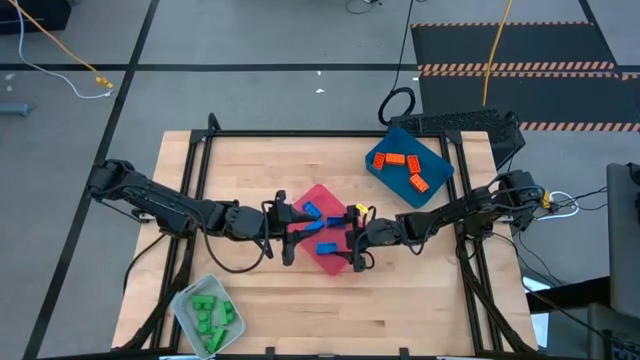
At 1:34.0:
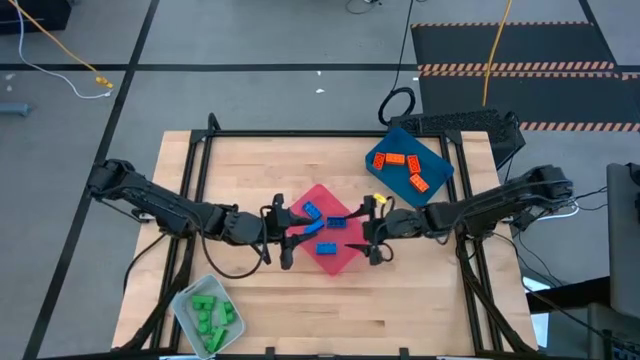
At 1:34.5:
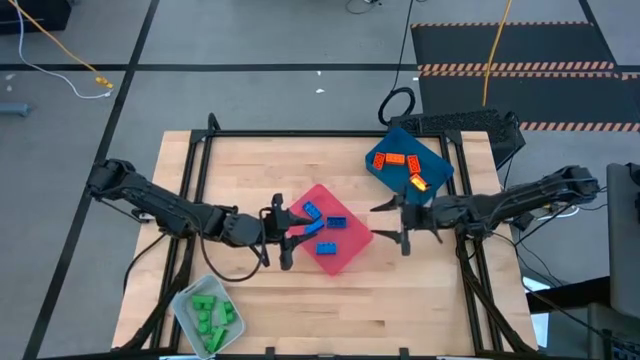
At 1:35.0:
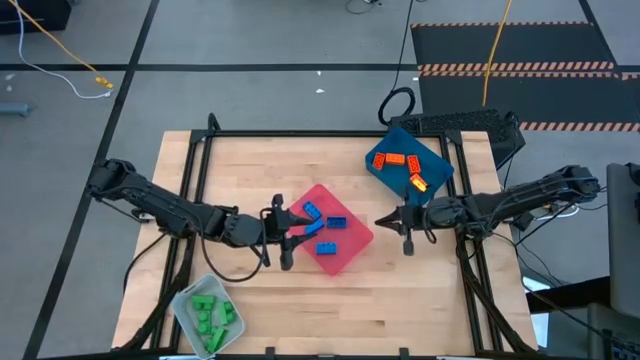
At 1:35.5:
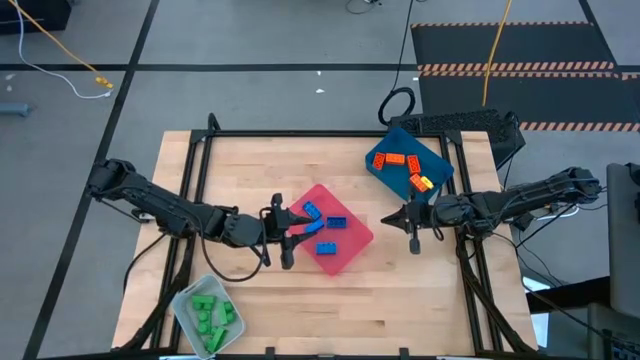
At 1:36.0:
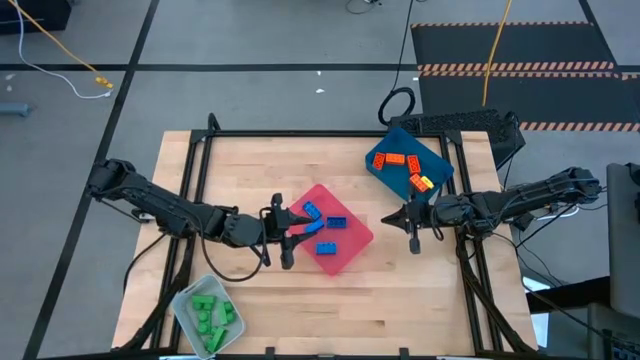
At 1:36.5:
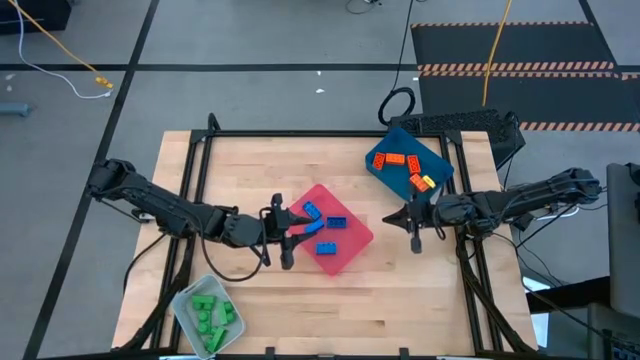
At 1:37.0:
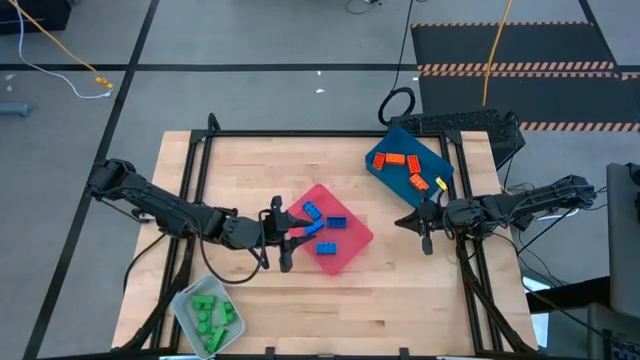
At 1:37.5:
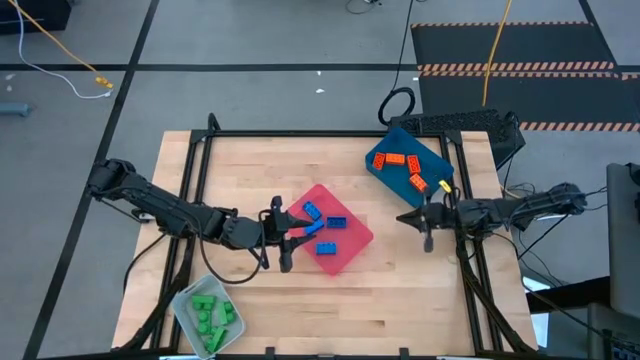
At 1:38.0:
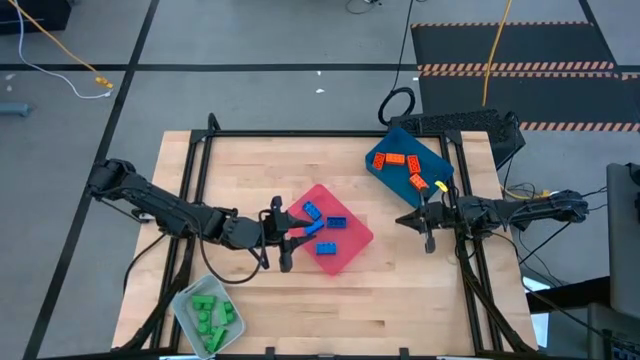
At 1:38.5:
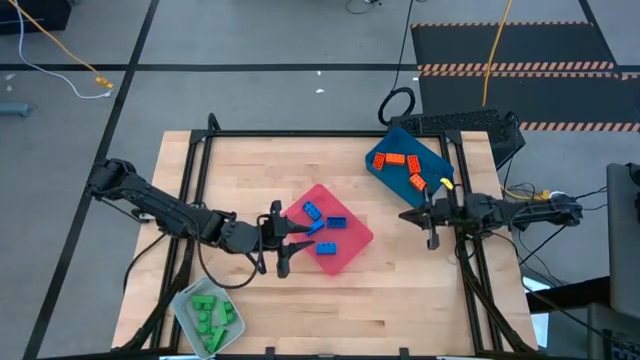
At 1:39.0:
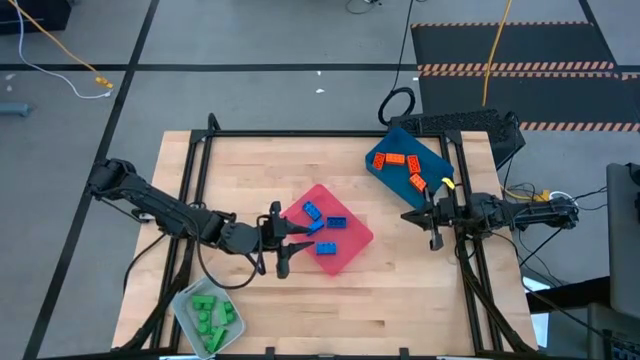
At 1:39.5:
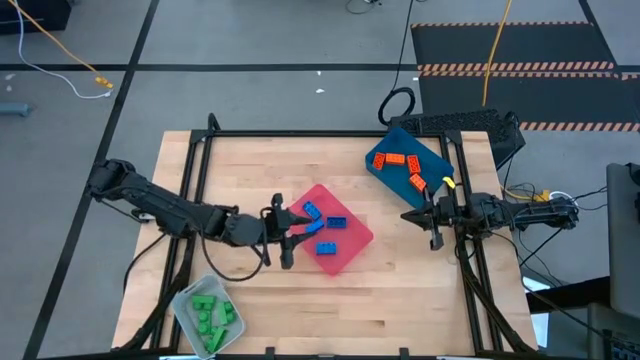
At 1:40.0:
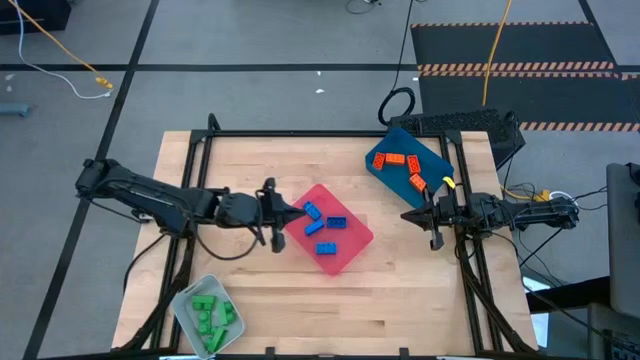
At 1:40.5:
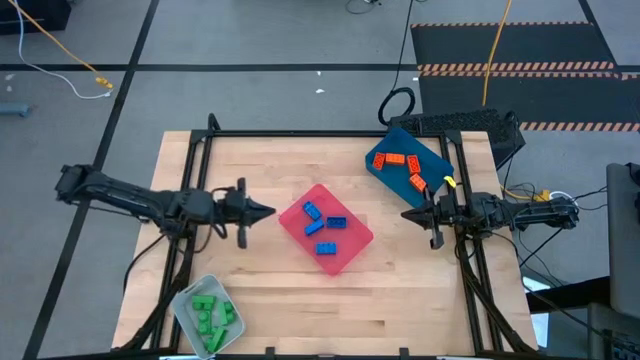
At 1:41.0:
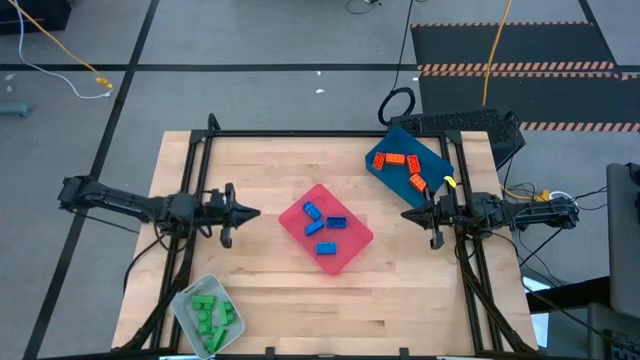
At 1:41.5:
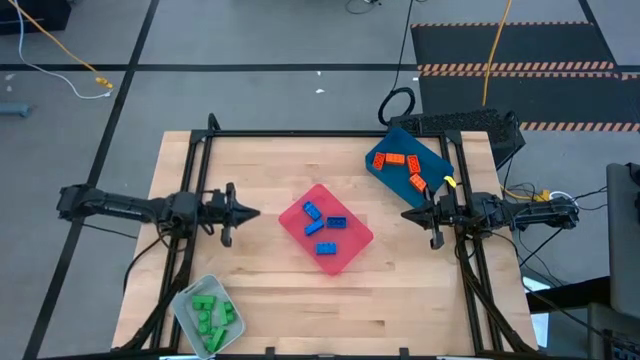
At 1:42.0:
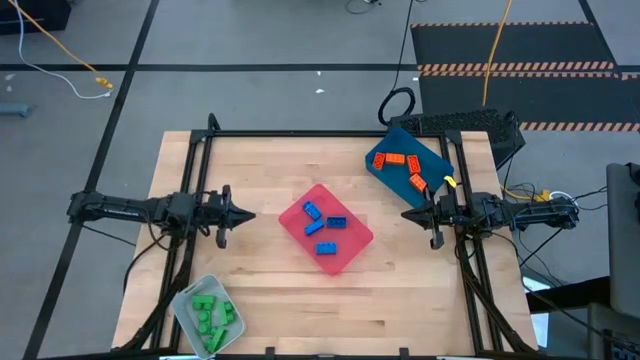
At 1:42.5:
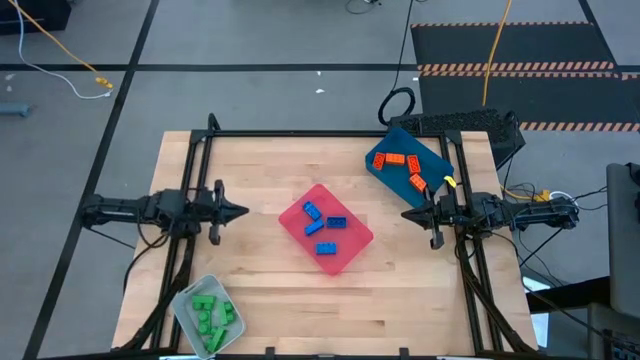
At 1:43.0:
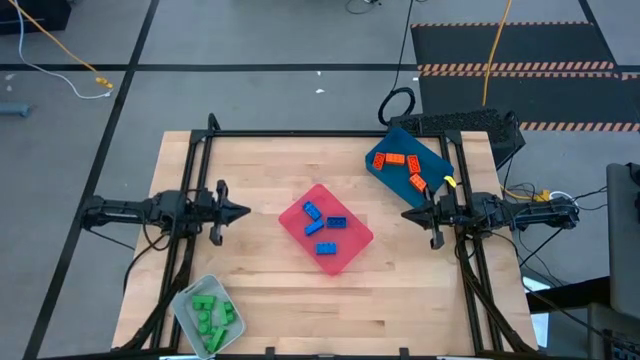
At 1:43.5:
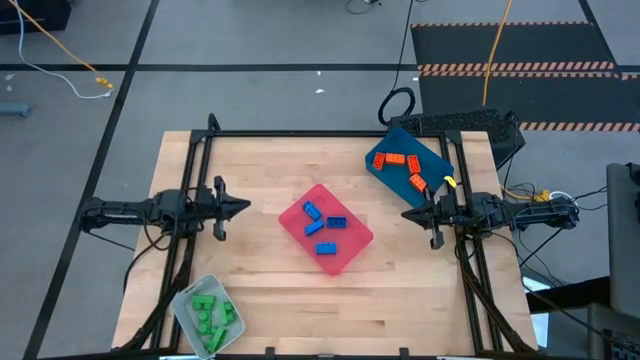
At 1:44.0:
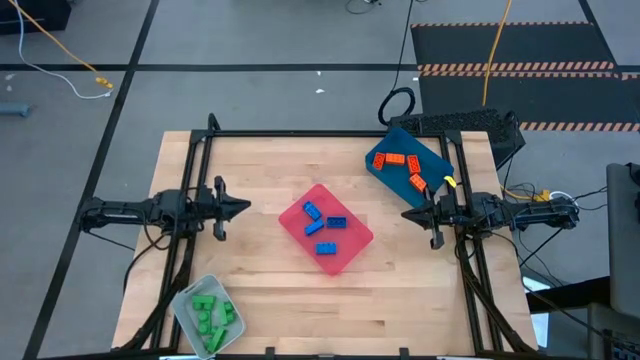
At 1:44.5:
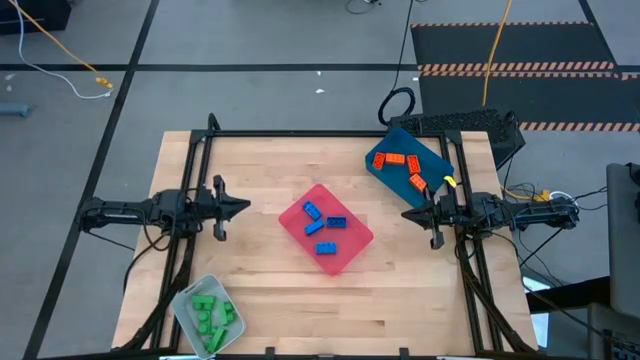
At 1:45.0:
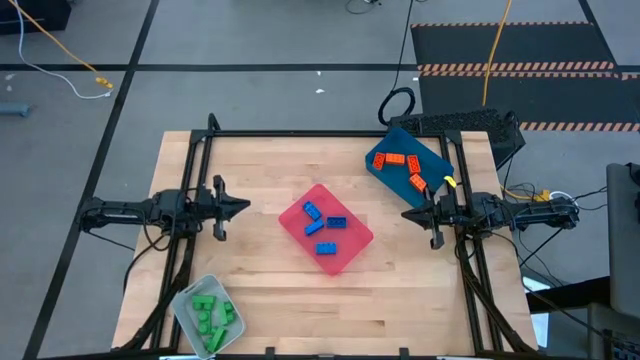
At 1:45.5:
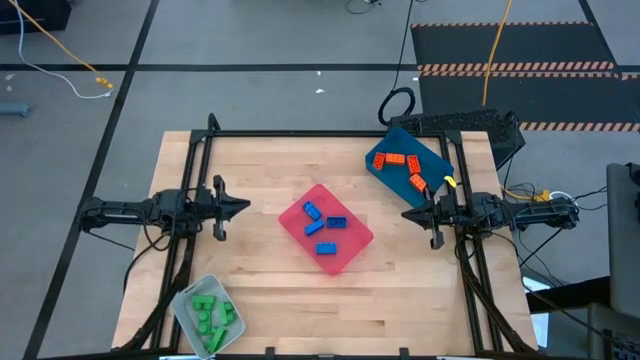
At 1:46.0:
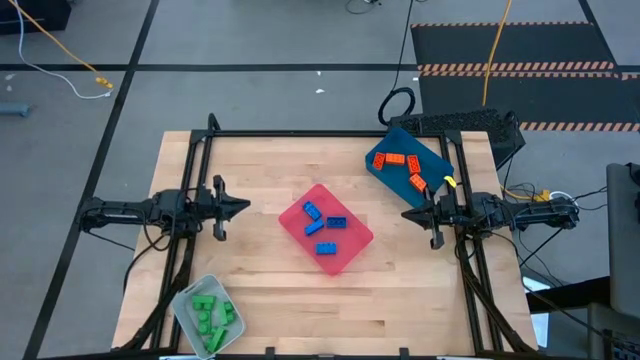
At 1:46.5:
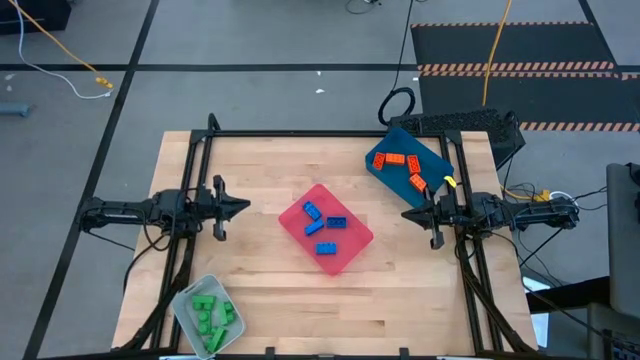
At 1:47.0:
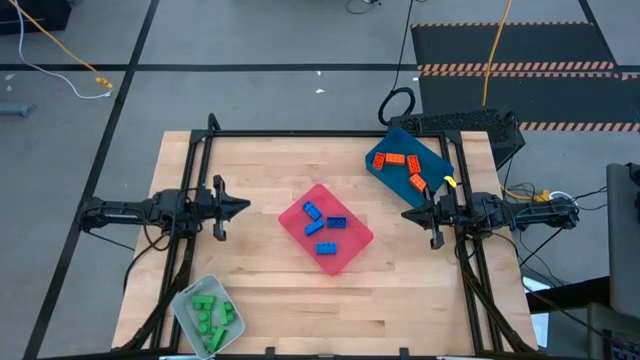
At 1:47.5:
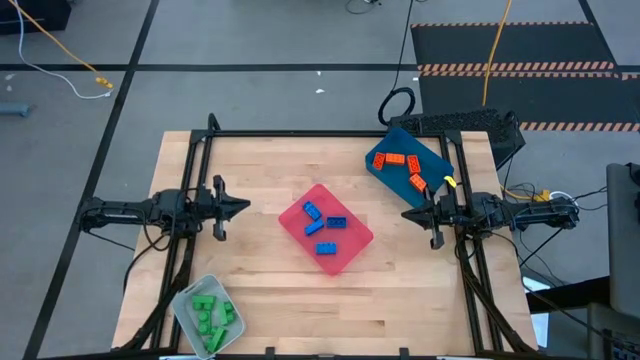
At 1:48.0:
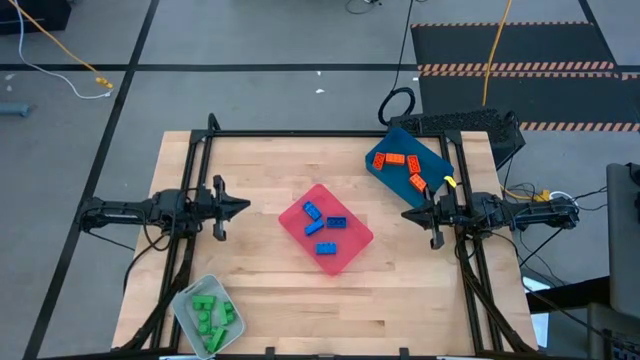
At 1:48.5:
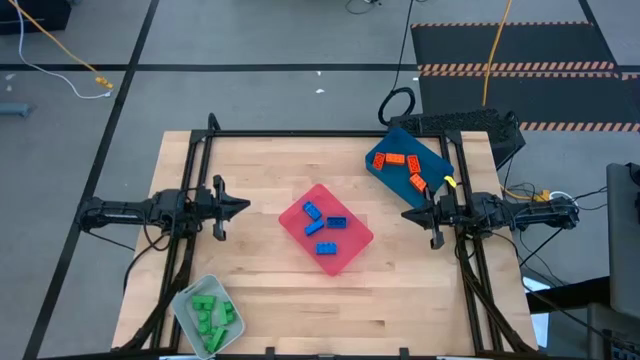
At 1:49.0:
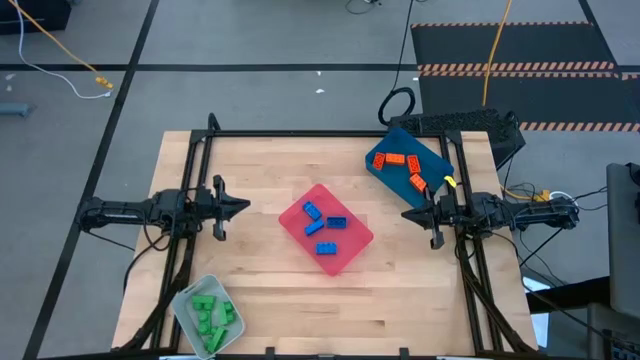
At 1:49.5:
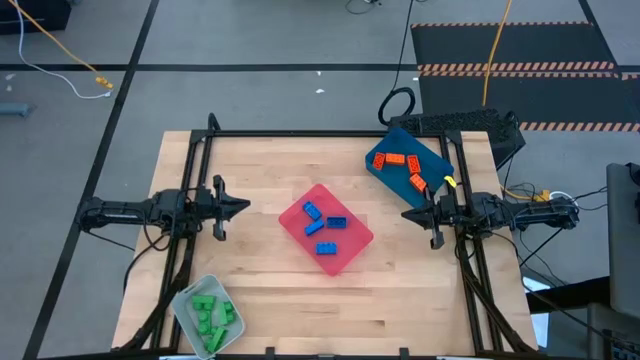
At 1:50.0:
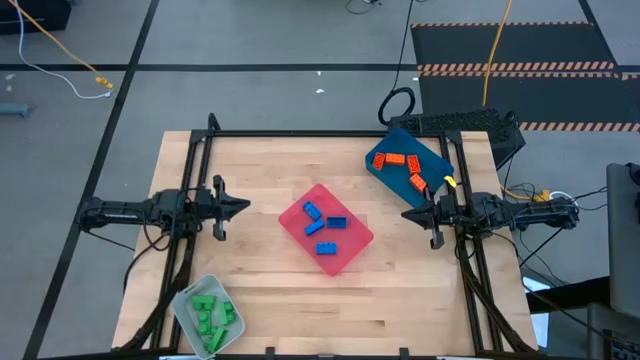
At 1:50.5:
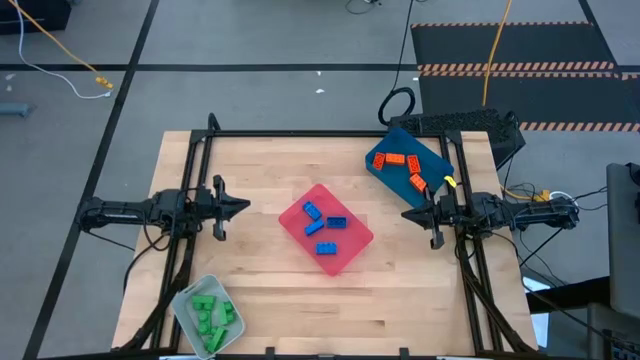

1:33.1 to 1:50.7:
Task: Sort & place blocks by color
Return to Home Position

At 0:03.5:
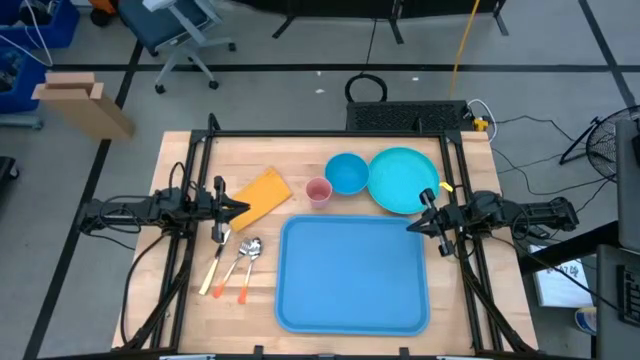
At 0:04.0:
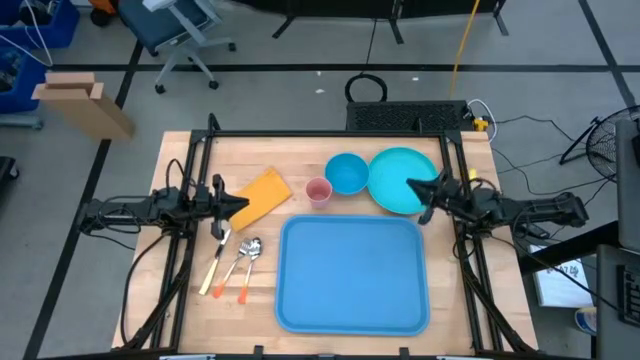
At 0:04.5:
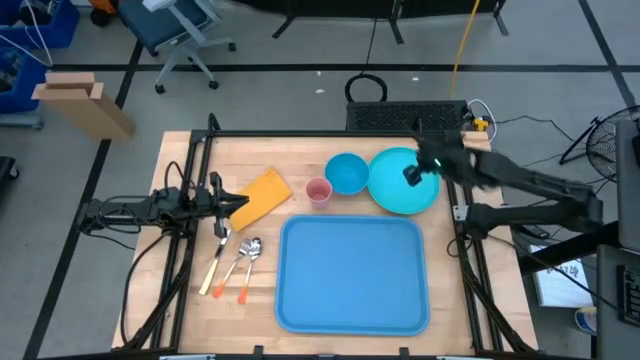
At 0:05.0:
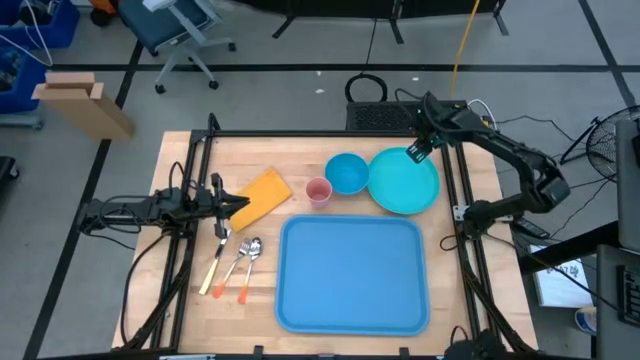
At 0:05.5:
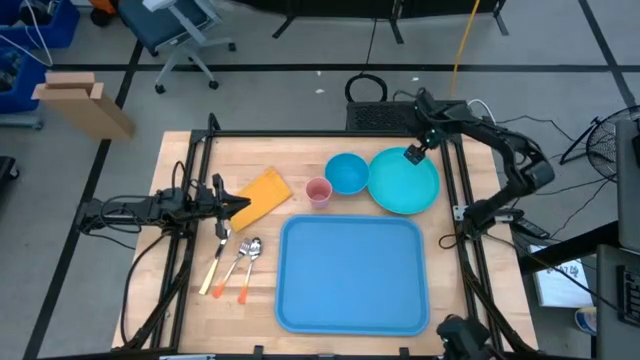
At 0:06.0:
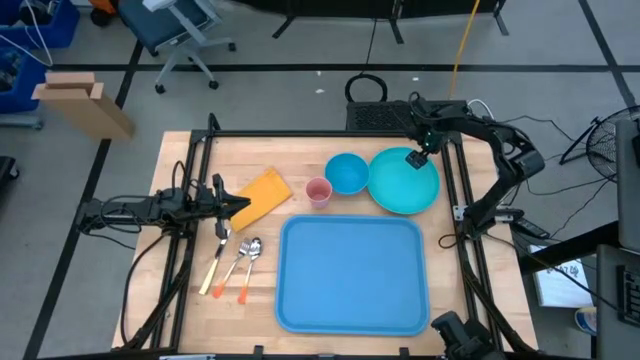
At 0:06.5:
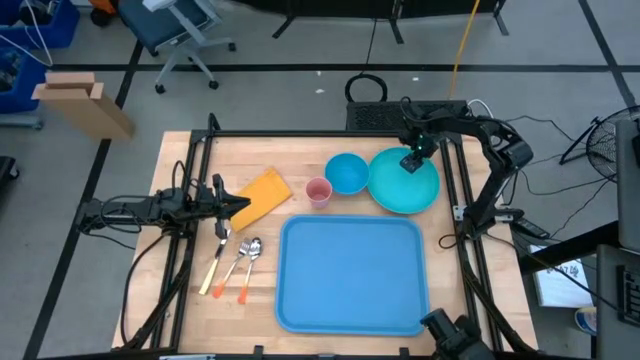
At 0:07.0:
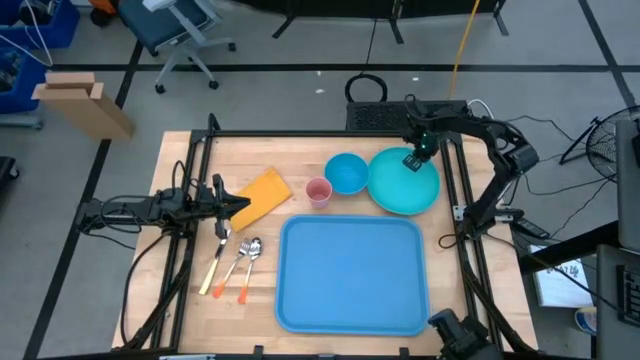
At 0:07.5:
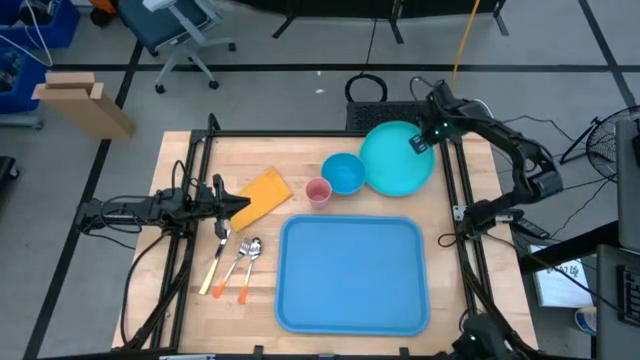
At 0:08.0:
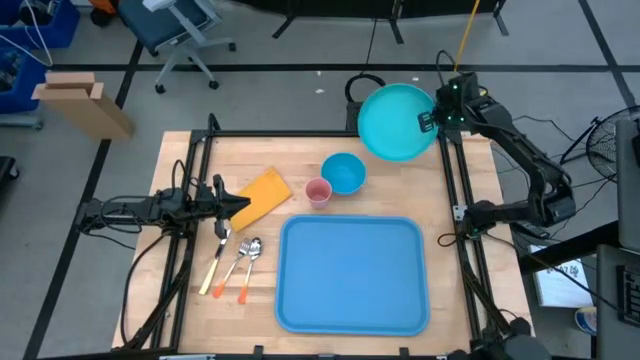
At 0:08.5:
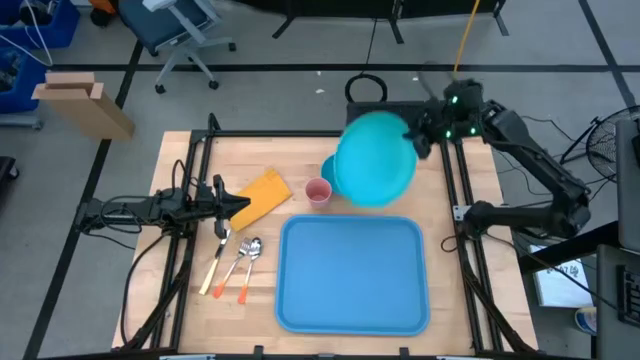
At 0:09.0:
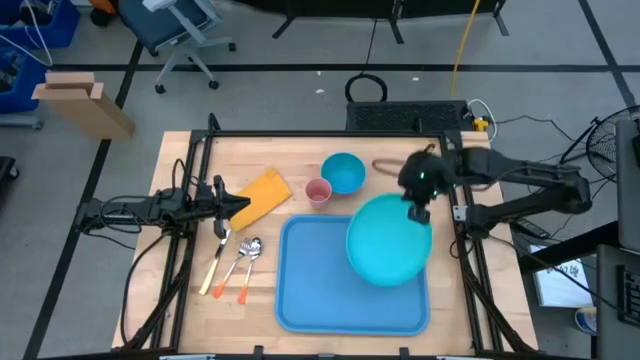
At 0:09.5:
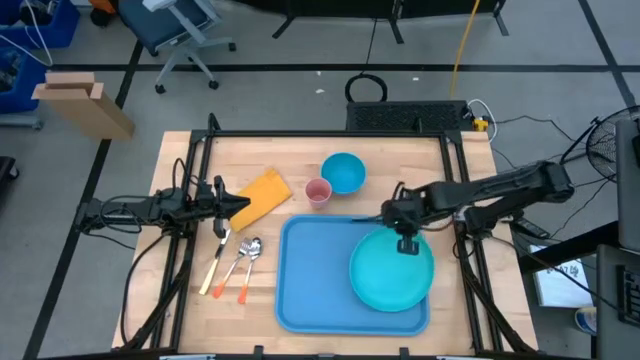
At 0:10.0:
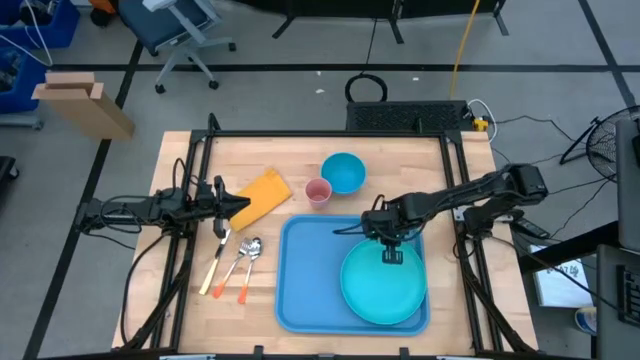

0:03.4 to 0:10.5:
Task: Set up tray
Put the green plate on top of the tray
